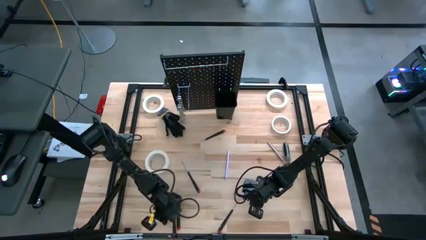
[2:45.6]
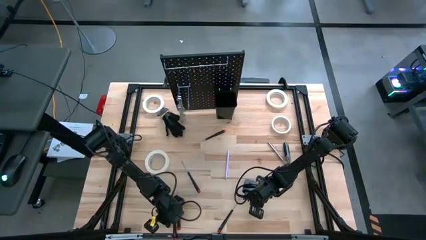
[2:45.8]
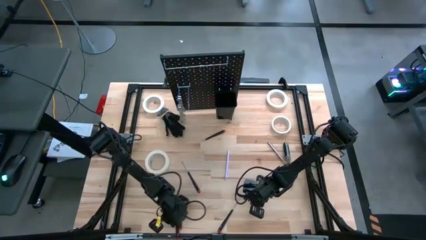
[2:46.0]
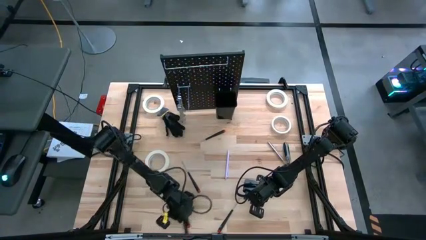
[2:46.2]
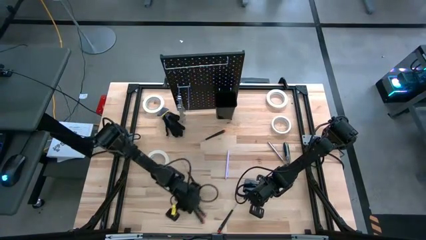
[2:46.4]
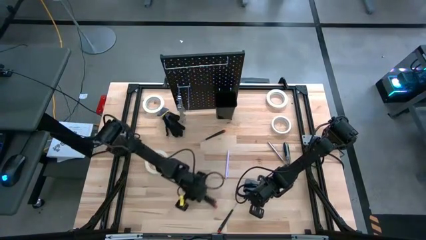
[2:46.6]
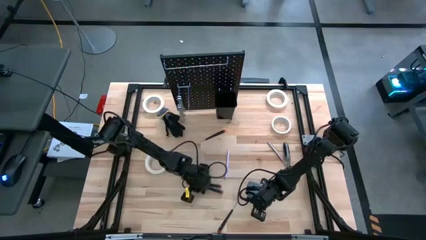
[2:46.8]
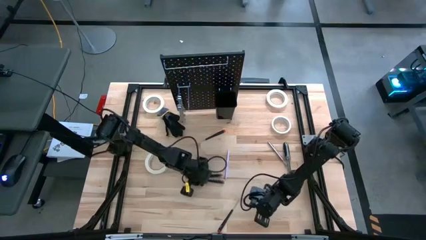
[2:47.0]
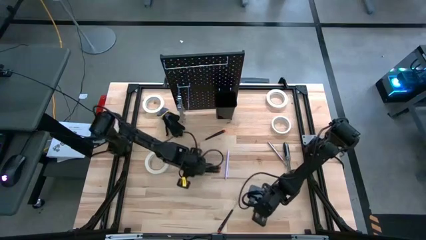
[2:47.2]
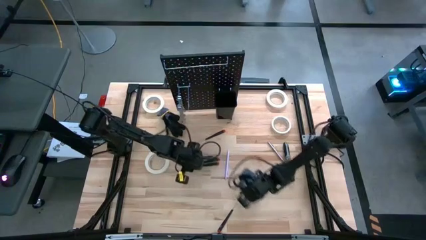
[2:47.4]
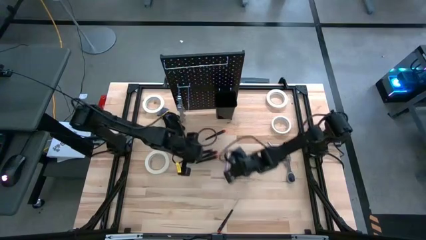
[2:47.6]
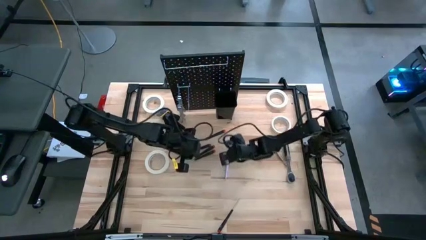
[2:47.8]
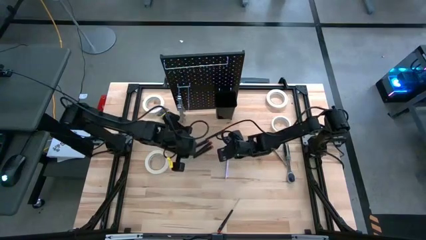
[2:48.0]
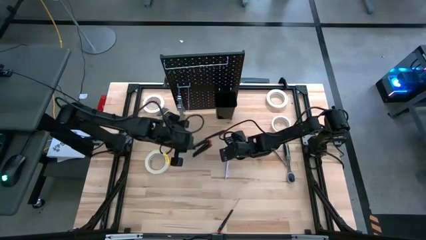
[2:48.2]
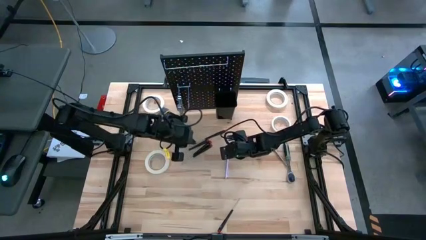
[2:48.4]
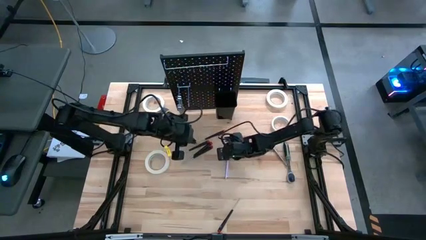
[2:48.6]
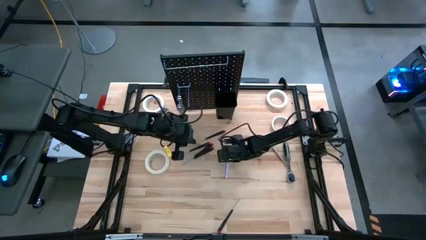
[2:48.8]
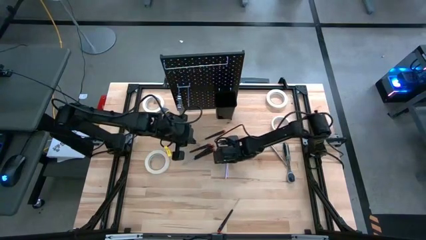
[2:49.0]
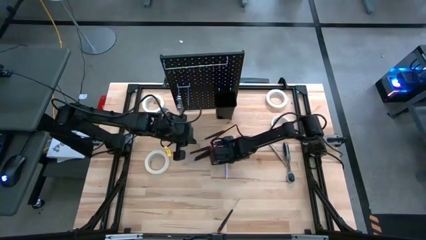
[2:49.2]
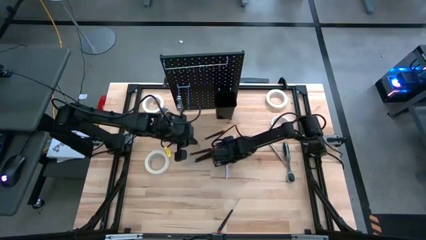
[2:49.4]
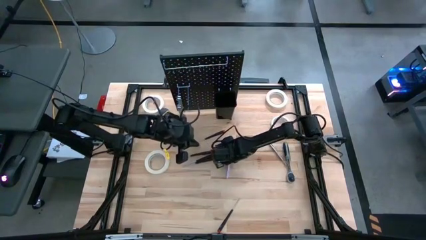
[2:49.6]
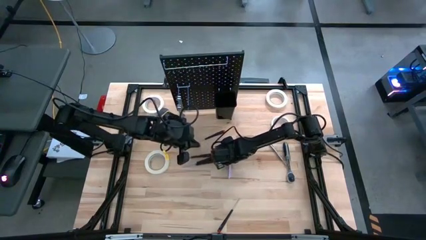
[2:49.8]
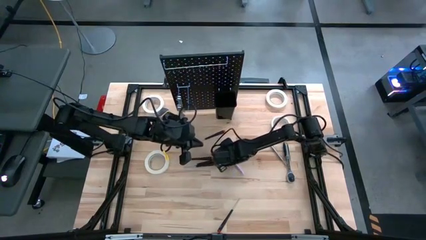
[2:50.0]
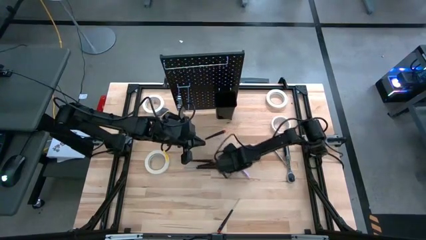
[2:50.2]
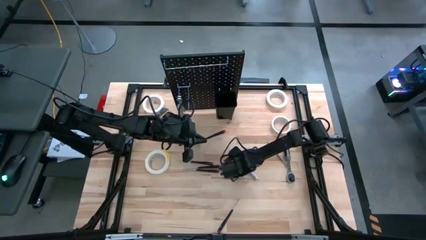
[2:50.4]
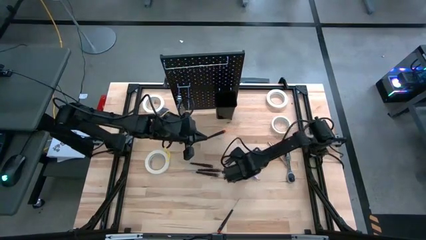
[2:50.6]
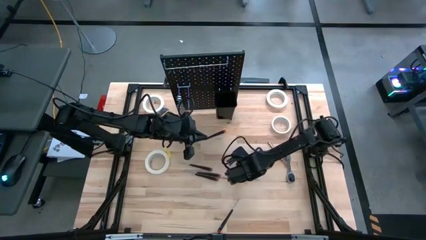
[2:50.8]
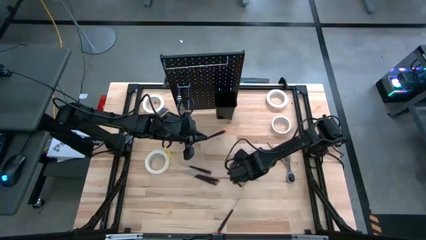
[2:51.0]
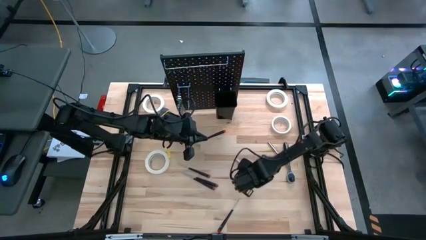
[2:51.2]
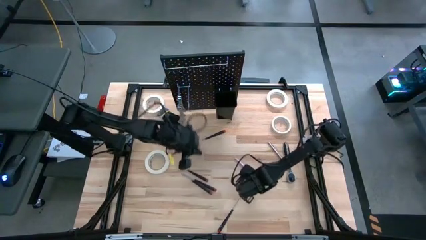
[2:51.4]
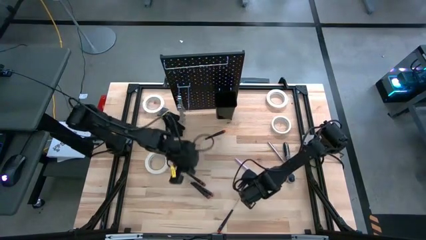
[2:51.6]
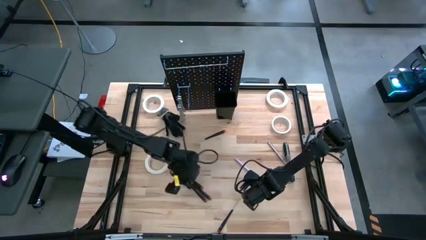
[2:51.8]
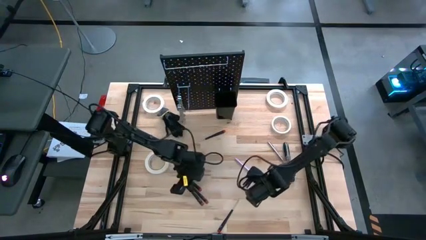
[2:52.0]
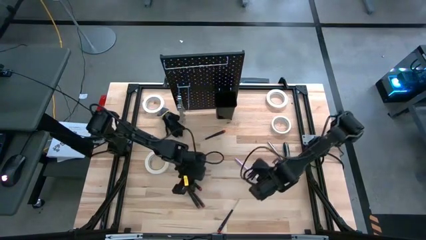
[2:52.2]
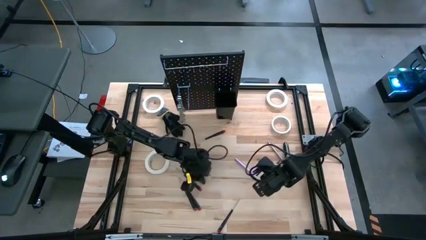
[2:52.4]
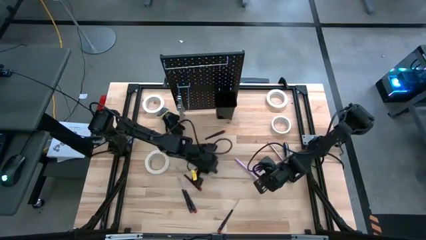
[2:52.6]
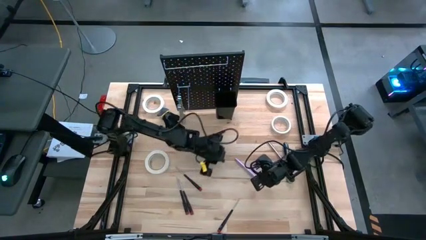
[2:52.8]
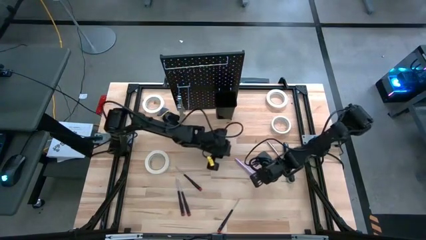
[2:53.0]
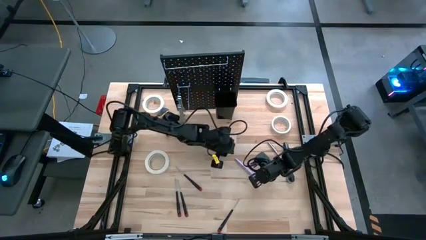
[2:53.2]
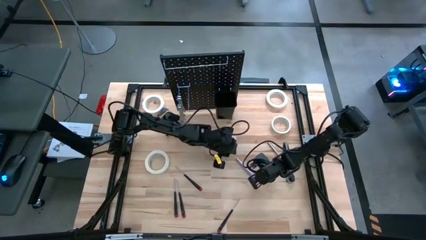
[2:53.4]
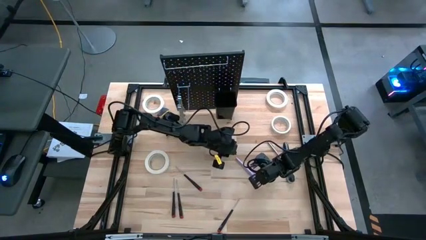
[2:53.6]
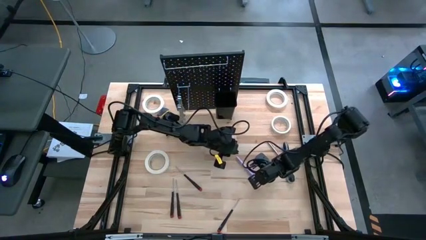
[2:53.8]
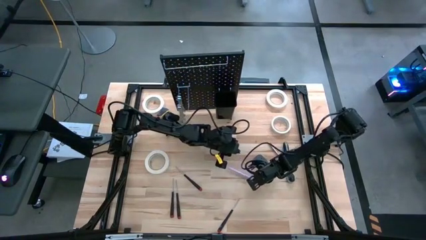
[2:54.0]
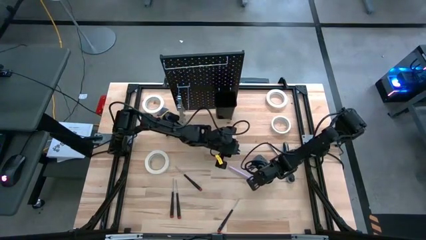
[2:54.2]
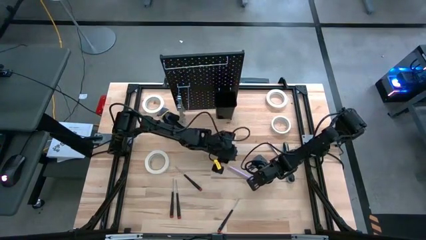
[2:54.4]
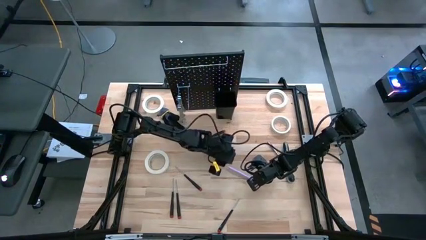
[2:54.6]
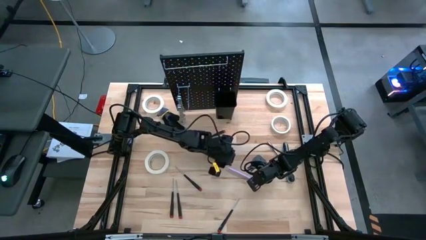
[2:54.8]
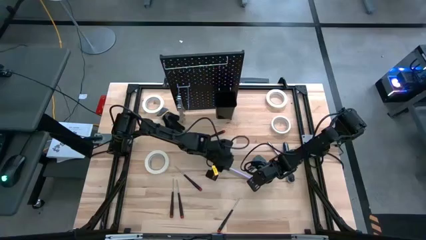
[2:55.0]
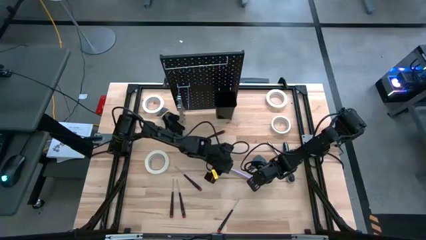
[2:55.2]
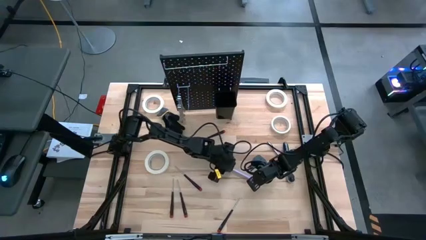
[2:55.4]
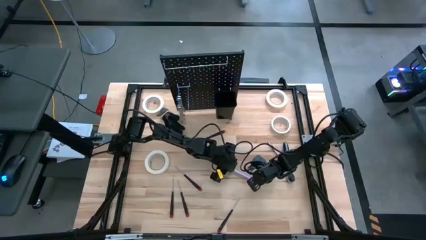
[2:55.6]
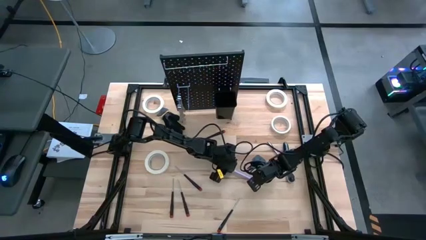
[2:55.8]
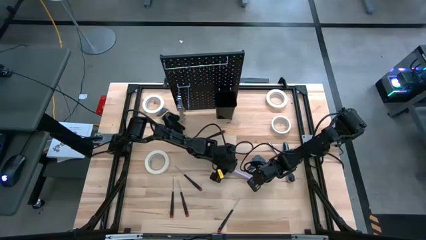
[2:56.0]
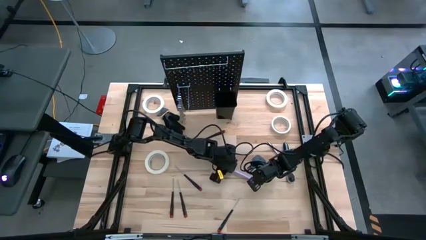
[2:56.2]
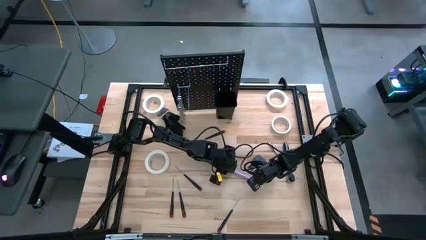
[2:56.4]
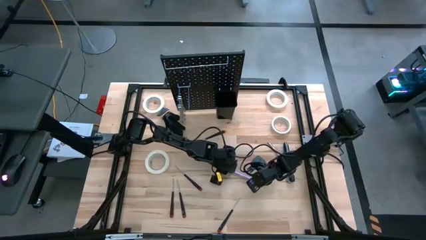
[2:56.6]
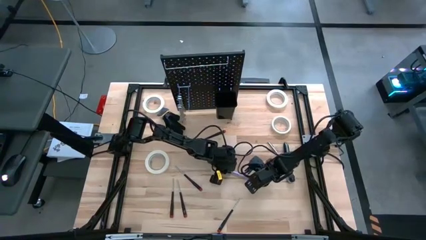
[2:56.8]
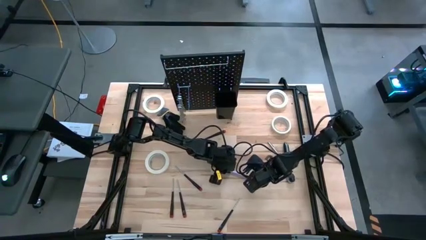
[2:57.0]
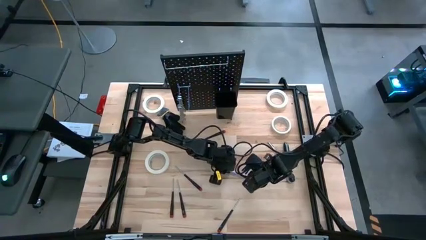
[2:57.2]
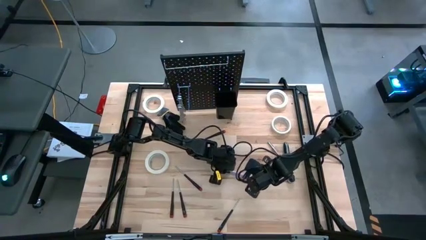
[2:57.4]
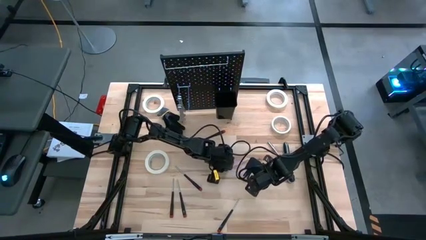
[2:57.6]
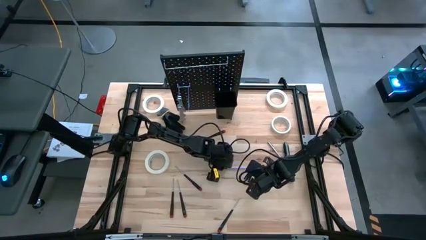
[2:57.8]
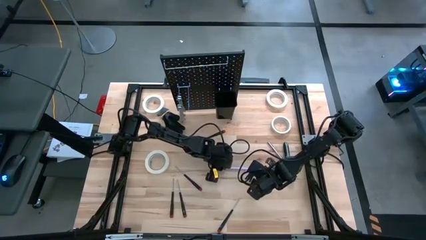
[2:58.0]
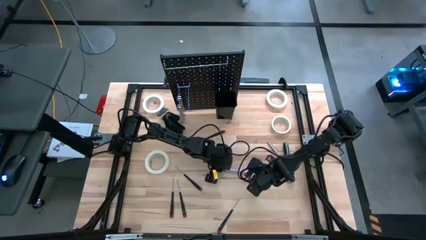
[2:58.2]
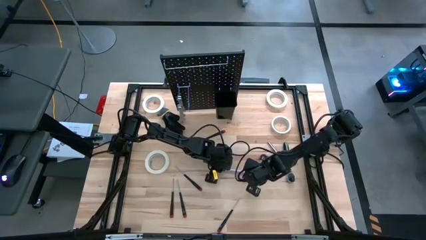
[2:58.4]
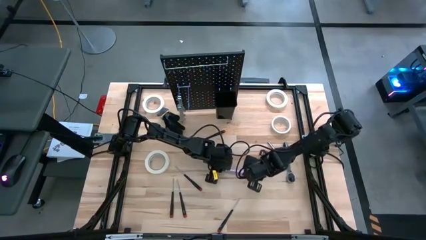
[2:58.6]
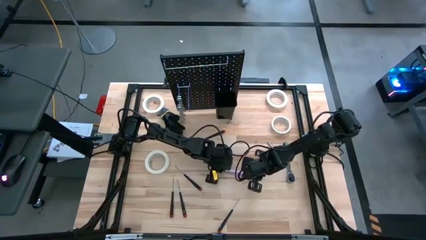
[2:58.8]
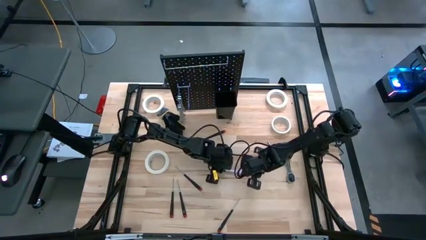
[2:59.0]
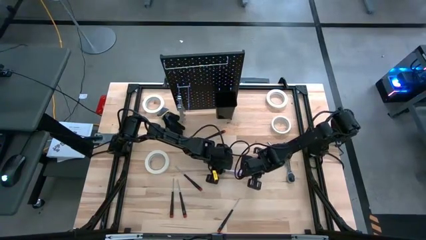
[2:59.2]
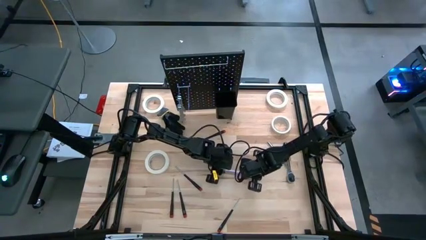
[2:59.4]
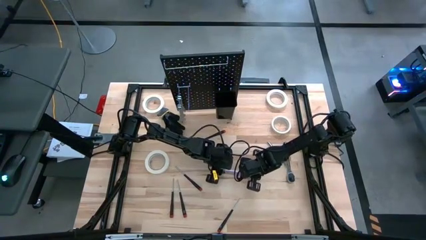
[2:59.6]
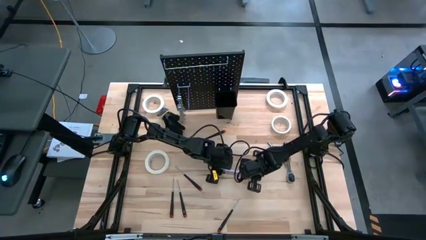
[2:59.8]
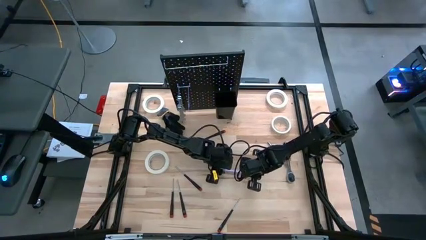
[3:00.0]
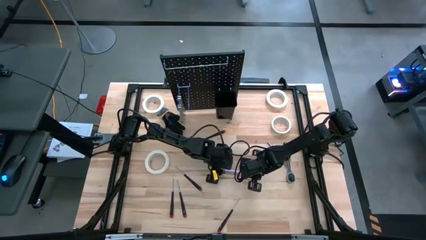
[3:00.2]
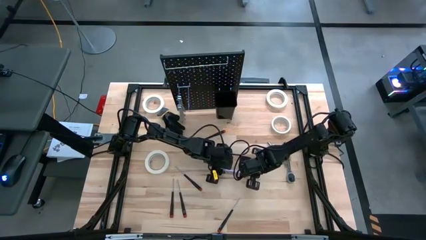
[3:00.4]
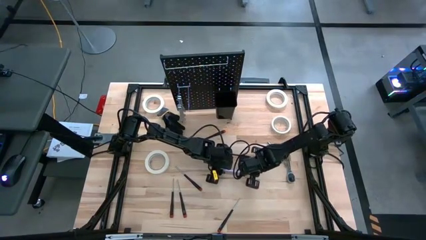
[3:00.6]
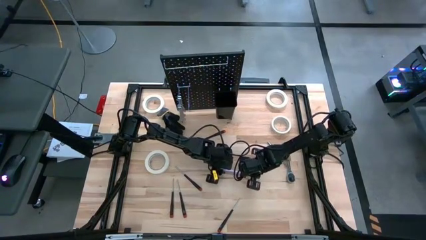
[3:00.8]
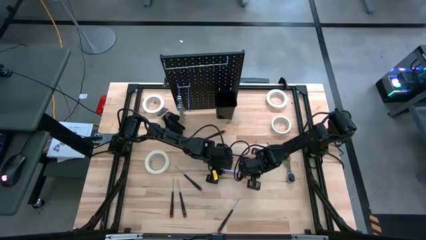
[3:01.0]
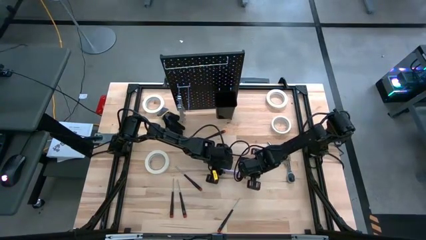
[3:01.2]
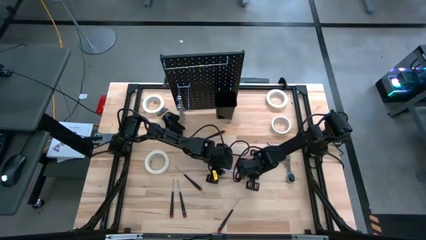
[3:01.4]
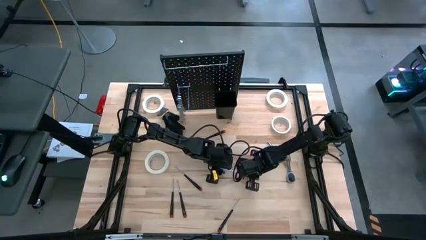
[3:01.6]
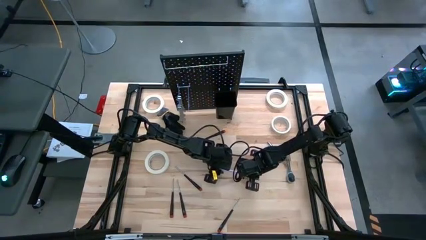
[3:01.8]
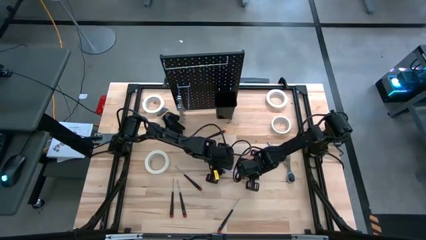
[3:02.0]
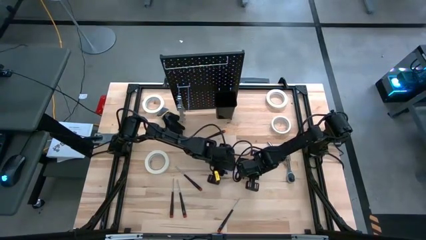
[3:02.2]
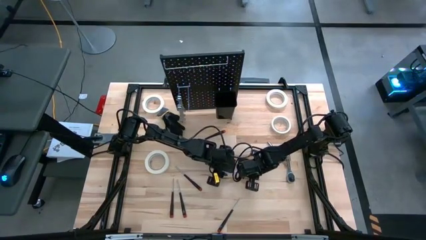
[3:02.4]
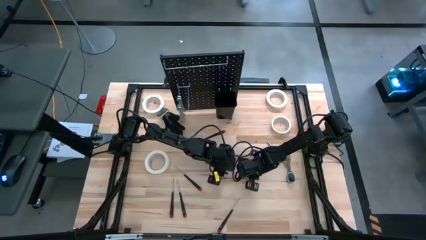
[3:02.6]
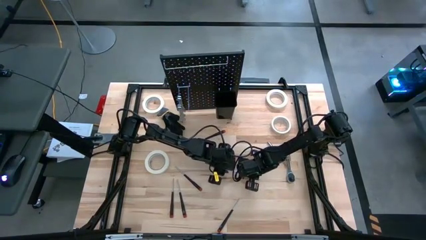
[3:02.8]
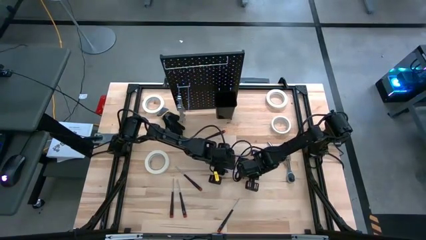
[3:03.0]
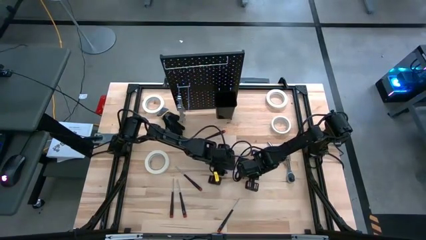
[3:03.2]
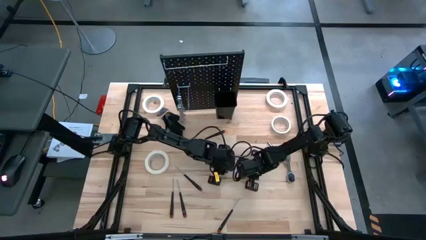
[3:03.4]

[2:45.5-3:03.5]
Task: Hang tools onto peg board
Put the purple pen into the black bin on the peg board
